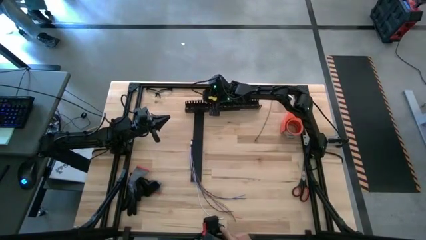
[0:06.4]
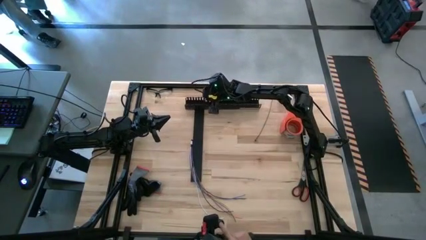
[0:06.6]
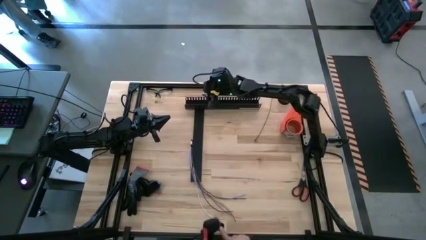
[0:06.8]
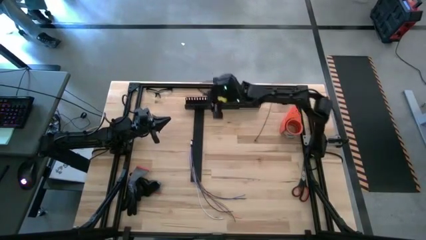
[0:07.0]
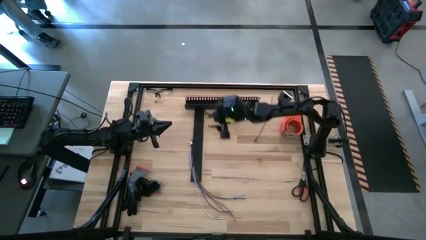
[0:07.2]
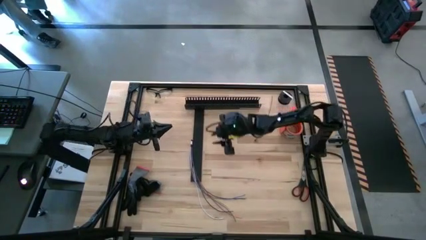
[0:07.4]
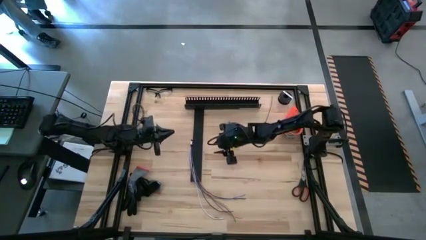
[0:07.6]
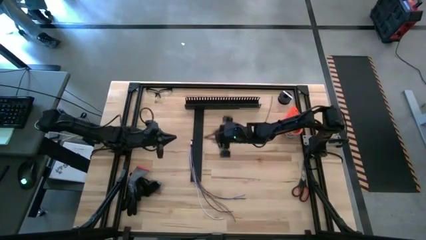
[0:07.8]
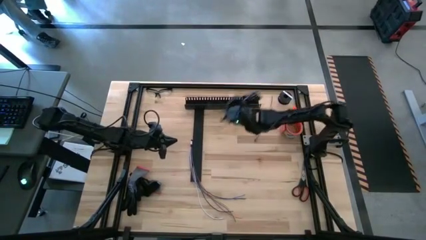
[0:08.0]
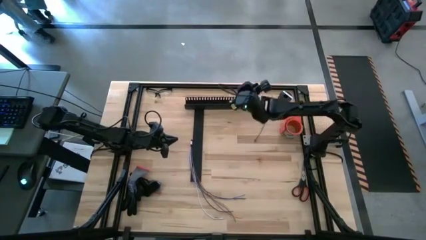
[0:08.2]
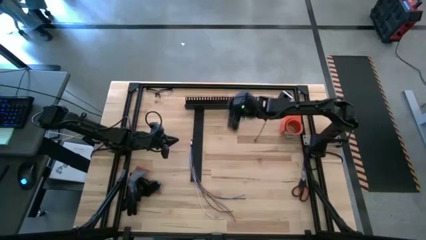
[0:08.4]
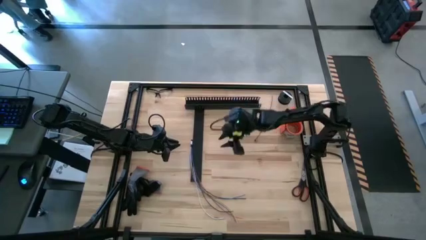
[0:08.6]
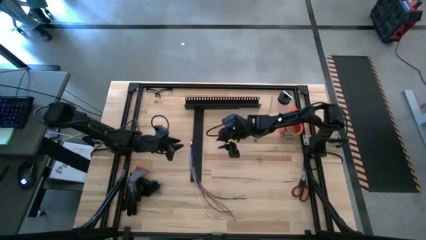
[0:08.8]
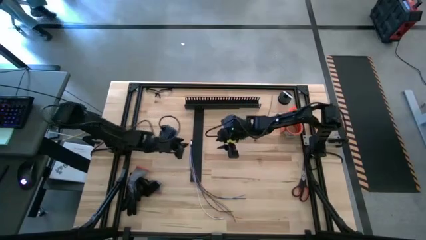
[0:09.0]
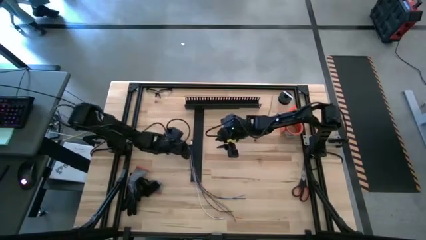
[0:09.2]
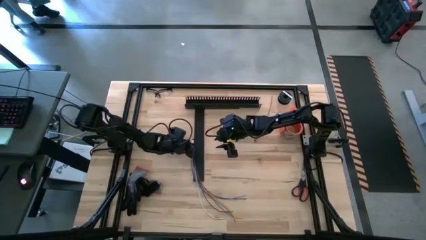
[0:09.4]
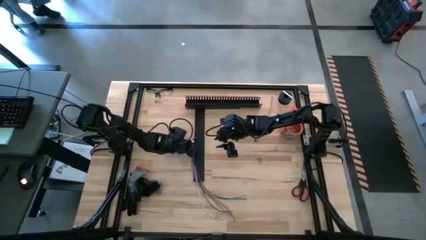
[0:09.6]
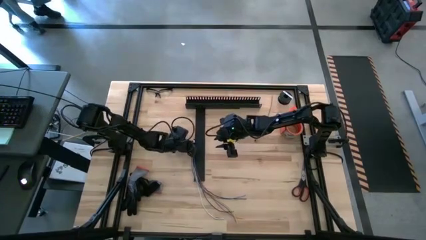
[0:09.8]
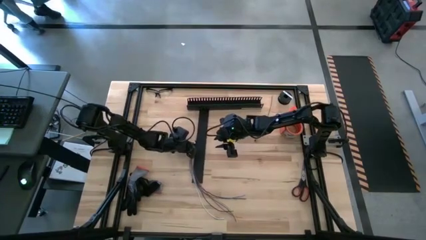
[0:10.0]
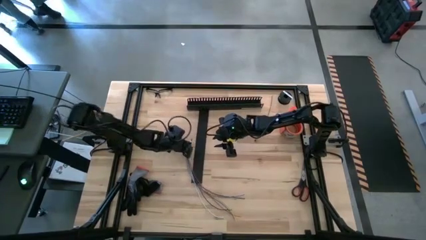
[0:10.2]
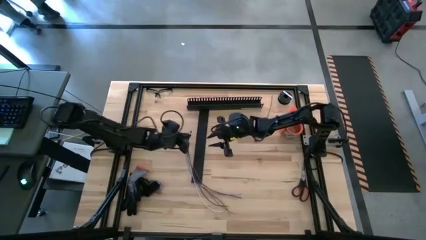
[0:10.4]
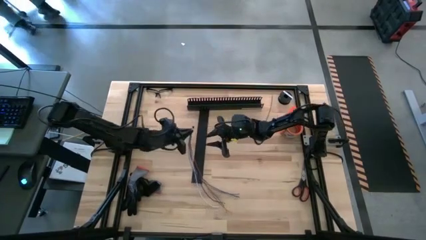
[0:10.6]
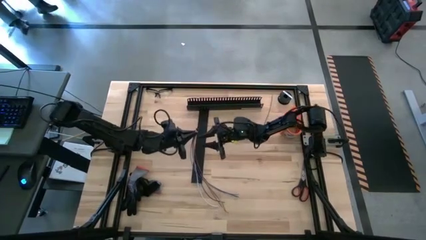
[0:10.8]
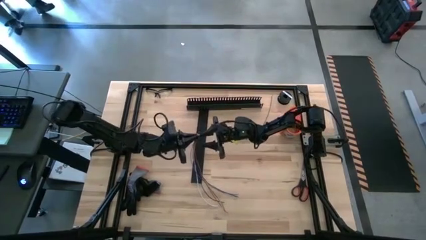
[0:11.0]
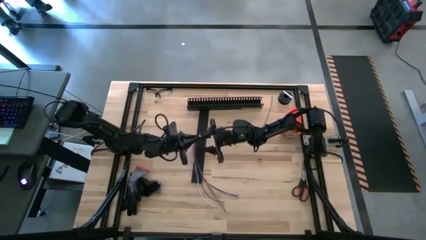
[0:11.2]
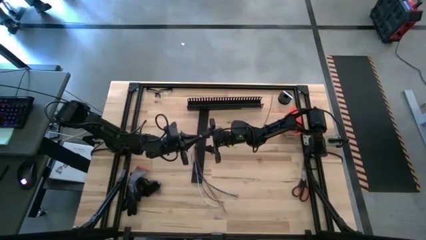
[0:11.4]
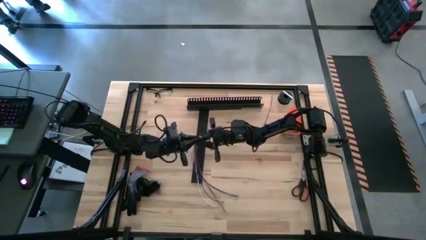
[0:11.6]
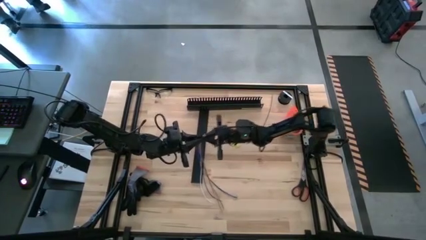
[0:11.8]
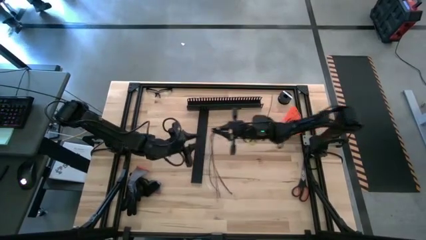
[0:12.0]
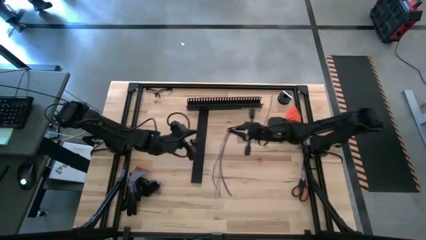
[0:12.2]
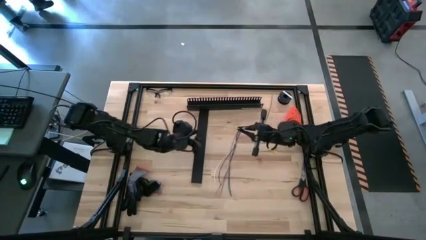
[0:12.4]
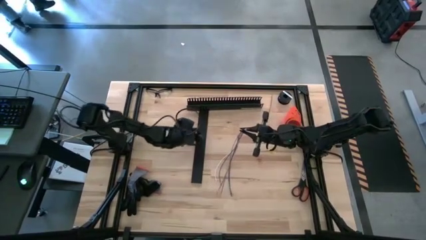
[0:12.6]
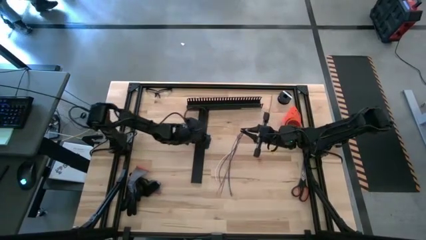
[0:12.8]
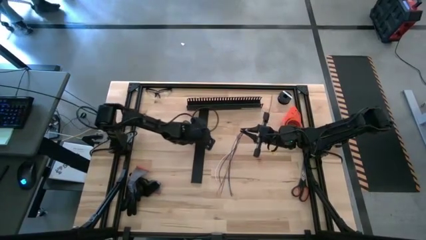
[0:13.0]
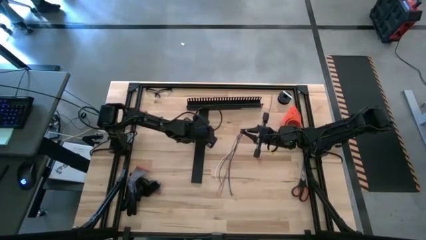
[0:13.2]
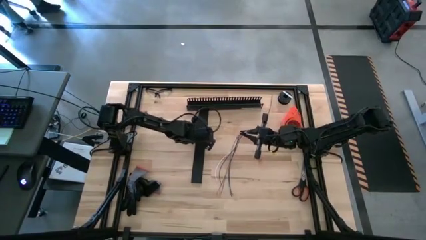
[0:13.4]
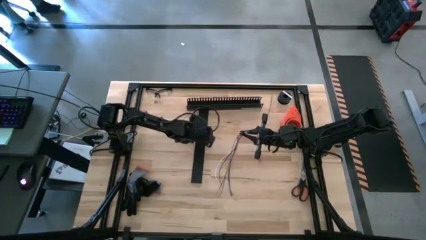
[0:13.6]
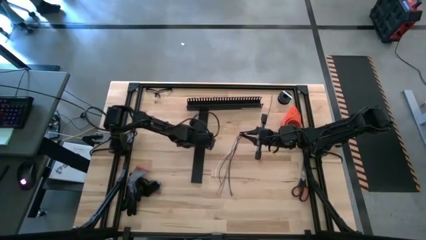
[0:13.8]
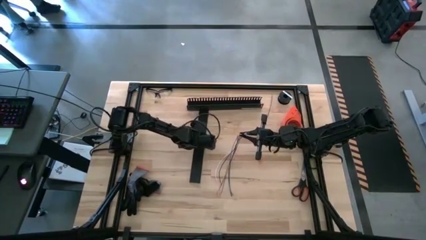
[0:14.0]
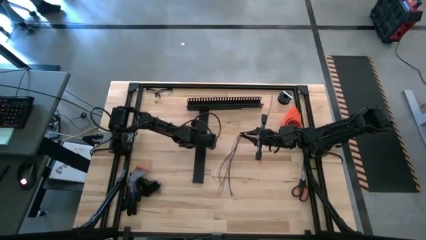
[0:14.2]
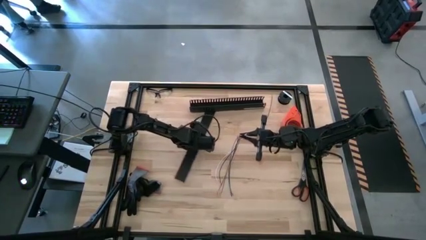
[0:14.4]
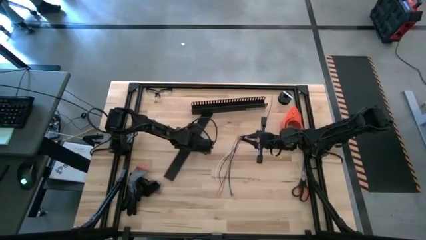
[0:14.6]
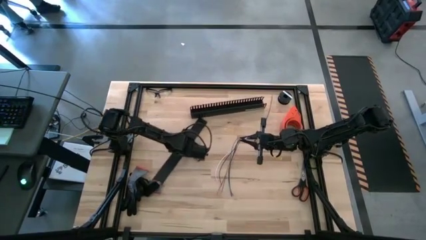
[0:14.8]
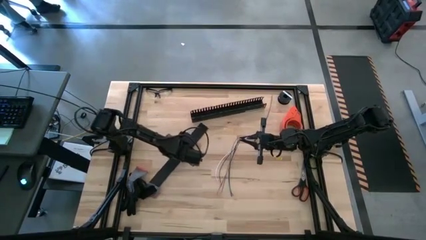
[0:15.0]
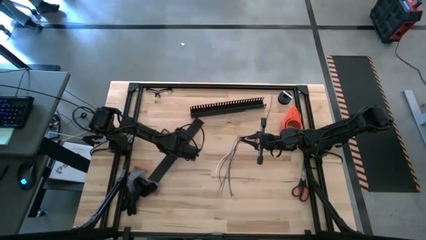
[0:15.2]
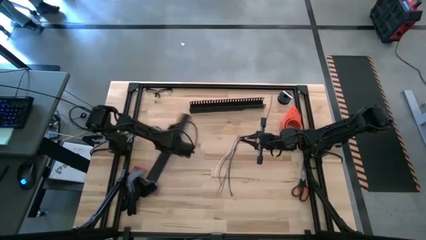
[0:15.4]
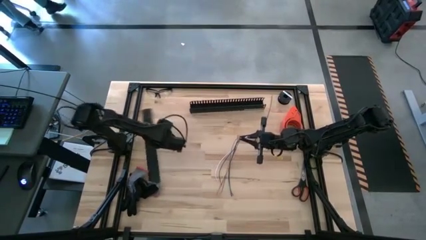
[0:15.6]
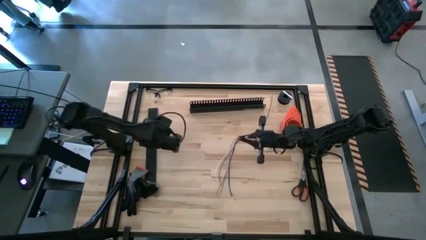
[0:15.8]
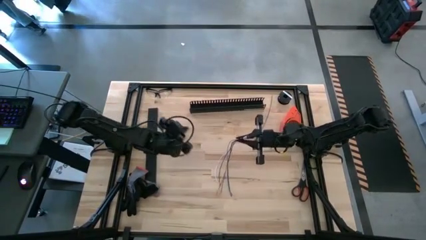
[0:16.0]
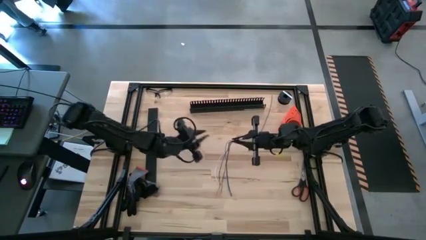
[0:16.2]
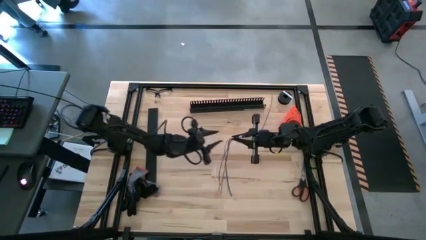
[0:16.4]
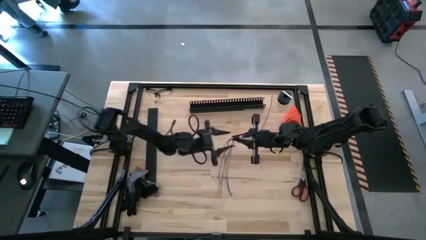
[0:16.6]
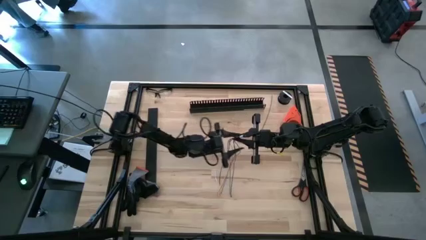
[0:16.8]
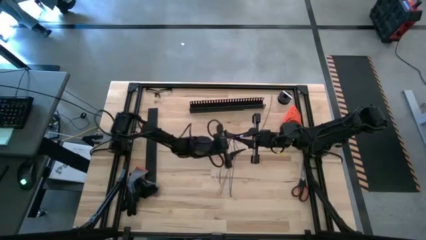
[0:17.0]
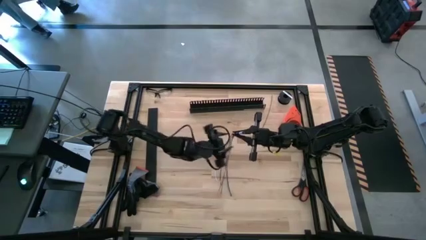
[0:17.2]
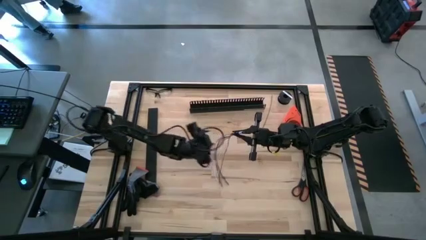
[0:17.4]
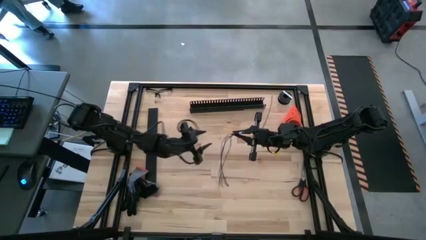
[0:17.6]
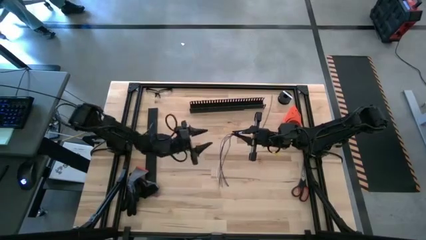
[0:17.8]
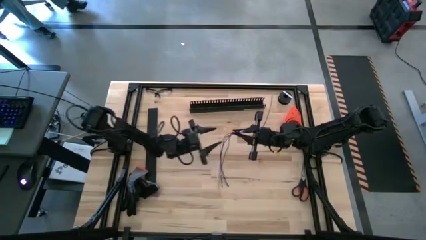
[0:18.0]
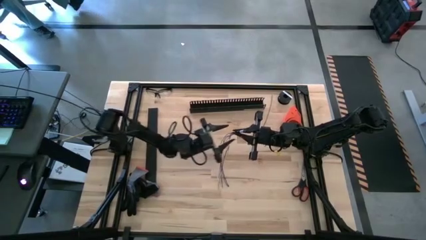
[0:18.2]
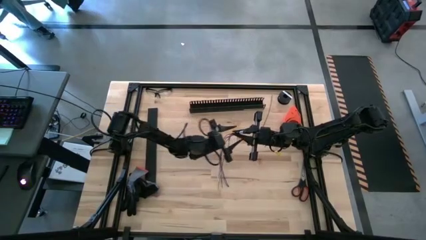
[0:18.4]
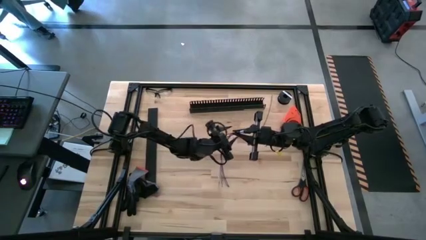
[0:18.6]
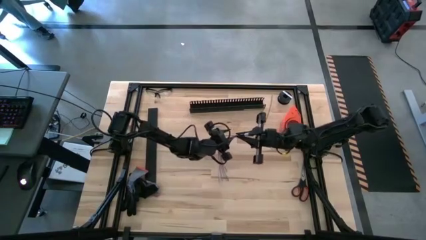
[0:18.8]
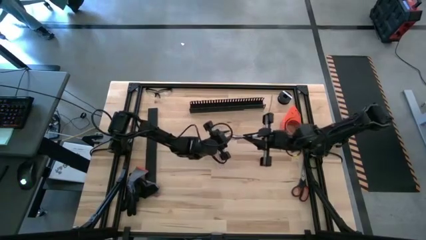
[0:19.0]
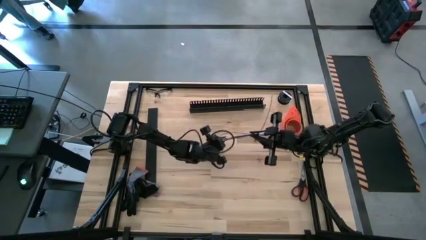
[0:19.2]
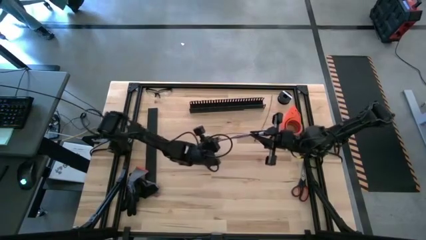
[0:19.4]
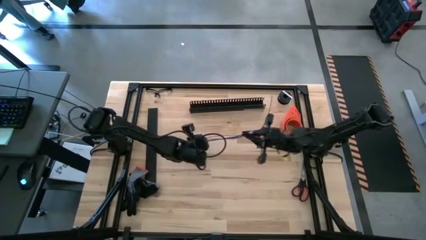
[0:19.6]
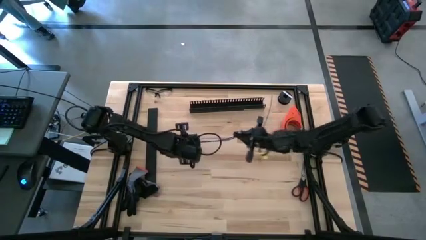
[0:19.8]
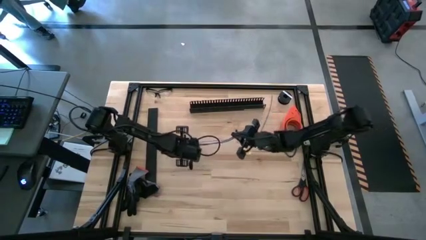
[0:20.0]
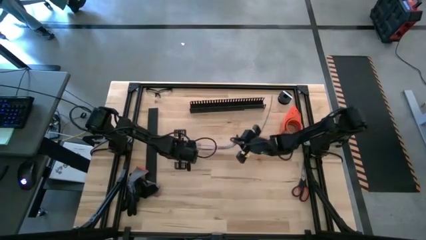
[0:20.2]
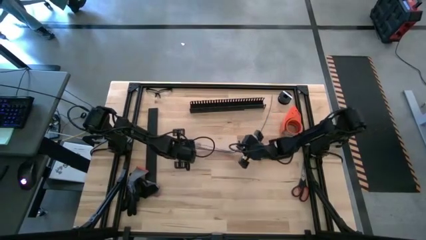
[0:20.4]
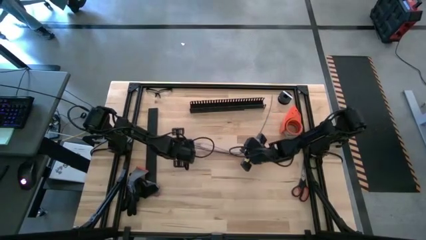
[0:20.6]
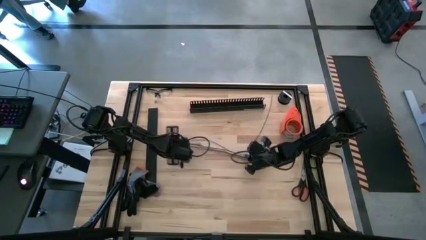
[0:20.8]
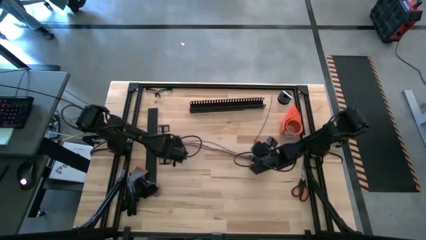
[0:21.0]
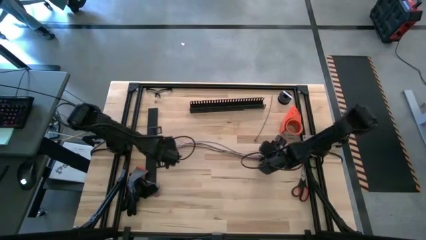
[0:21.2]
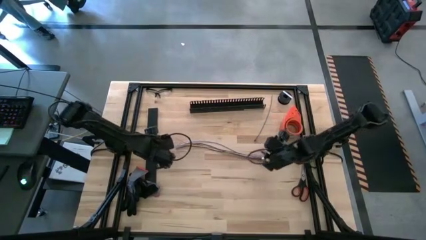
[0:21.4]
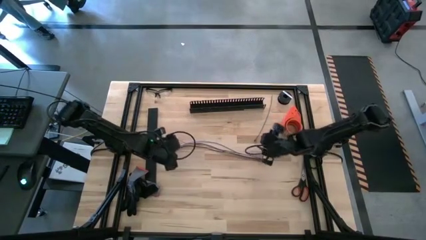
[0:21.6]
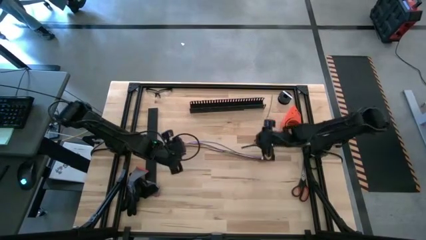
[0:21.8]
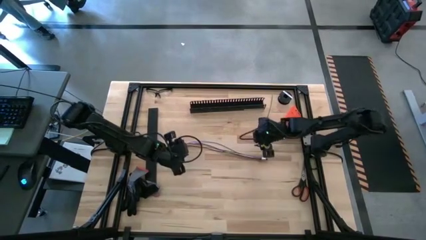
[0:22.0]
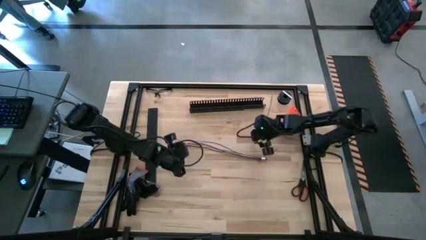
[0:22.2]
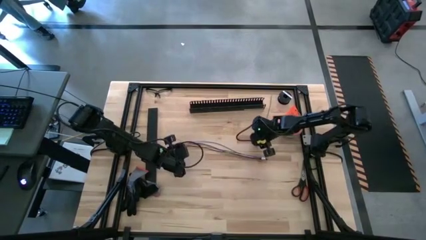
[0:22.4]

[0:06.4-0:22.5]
Task: Ziptie cables
Wrap the cable wires with a black zip tie
